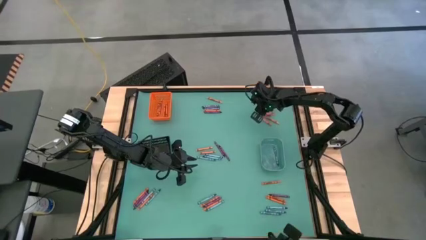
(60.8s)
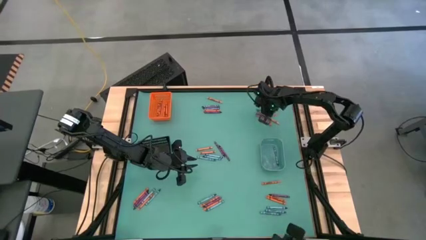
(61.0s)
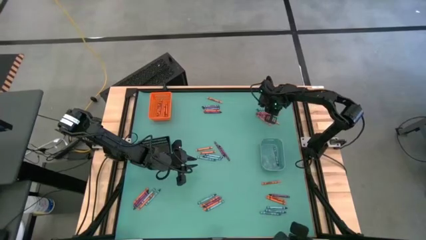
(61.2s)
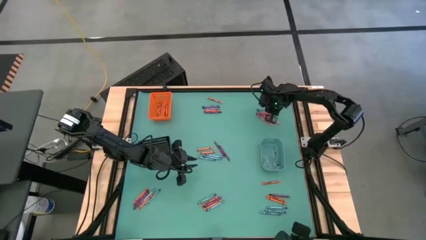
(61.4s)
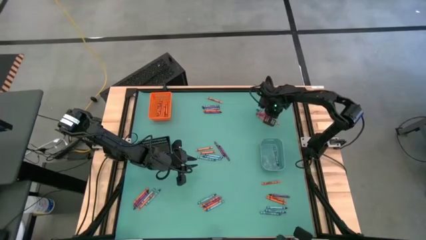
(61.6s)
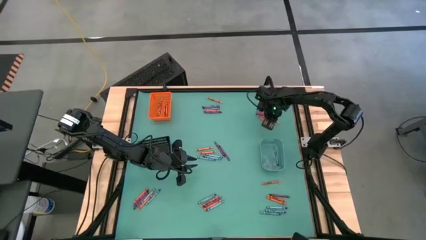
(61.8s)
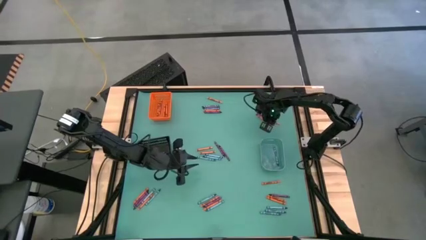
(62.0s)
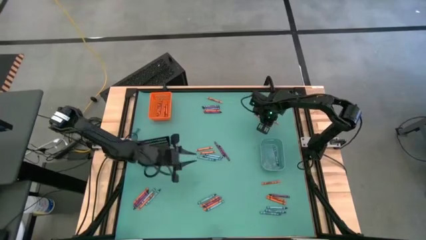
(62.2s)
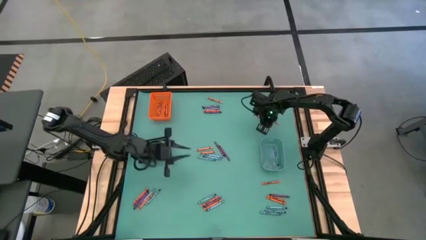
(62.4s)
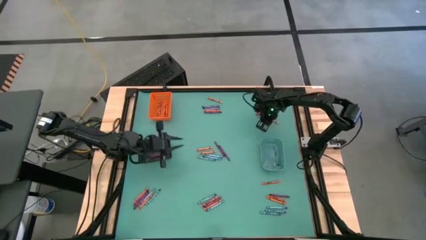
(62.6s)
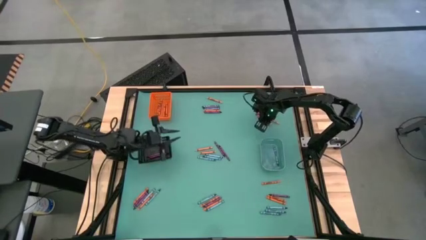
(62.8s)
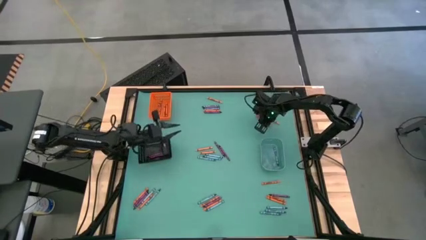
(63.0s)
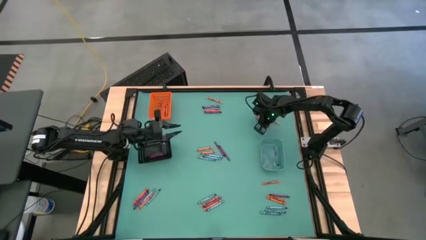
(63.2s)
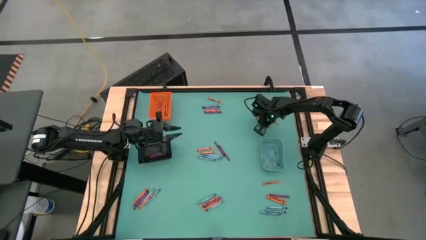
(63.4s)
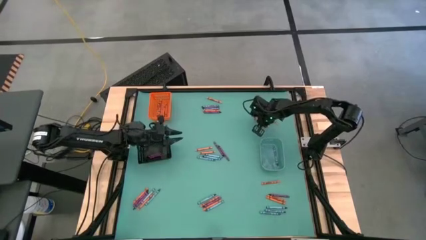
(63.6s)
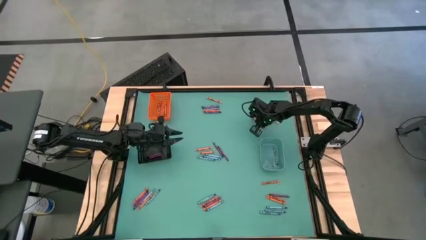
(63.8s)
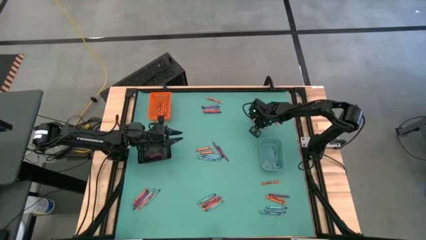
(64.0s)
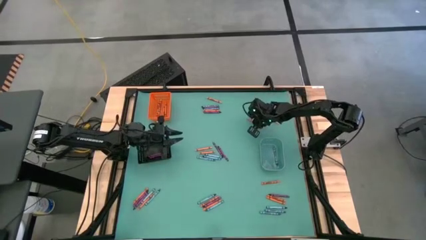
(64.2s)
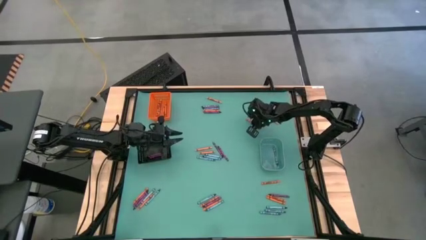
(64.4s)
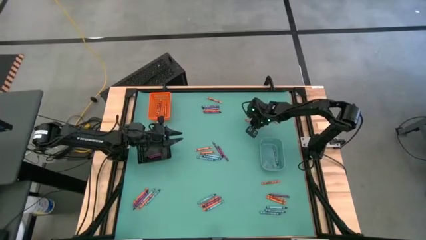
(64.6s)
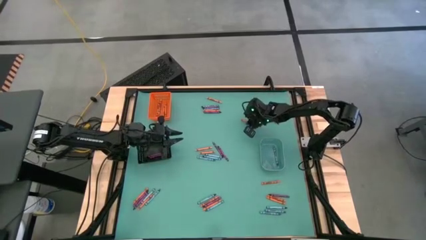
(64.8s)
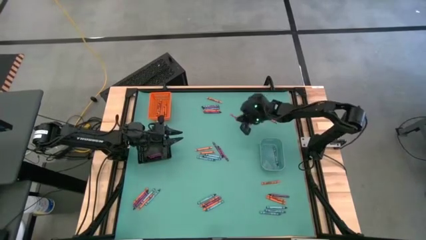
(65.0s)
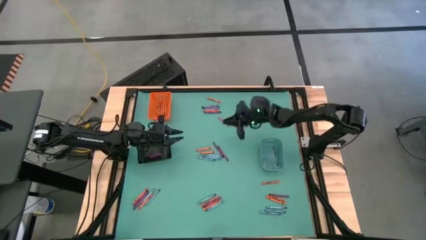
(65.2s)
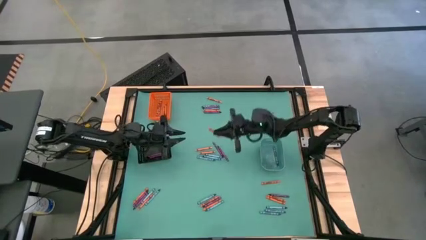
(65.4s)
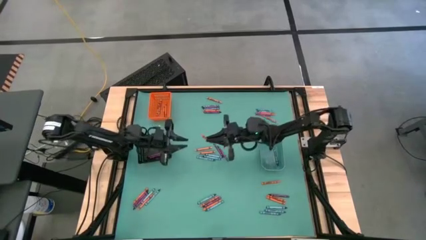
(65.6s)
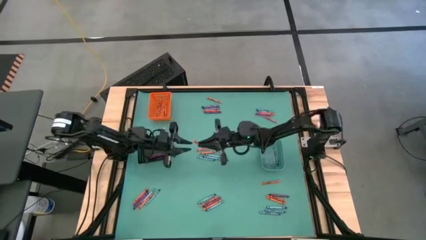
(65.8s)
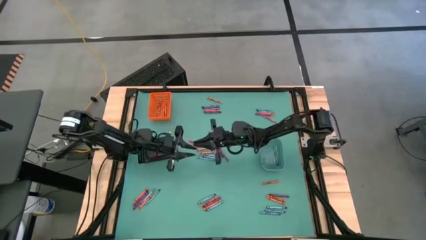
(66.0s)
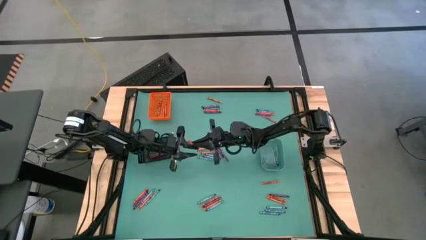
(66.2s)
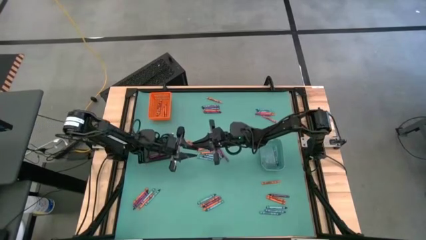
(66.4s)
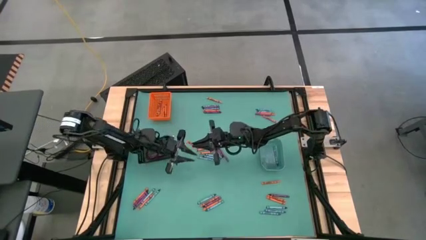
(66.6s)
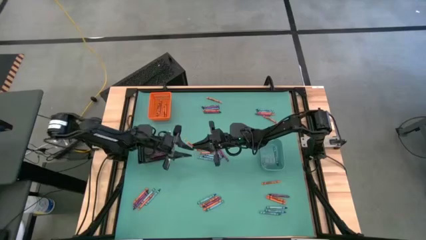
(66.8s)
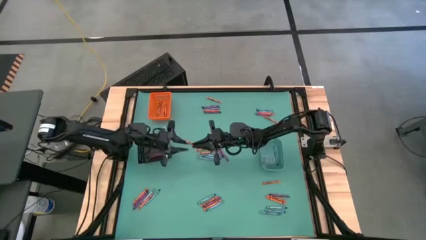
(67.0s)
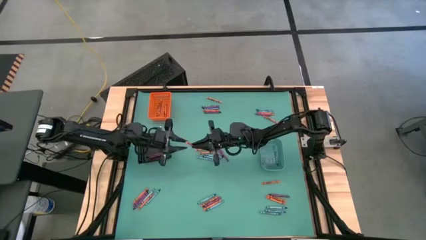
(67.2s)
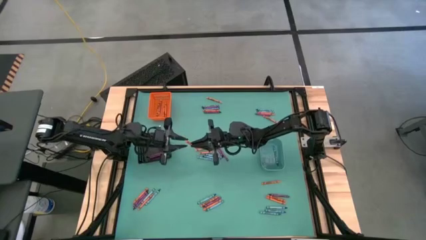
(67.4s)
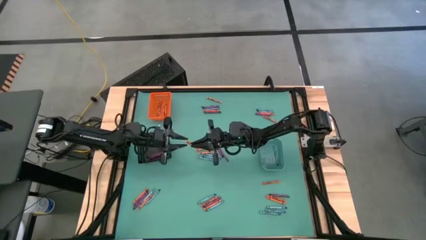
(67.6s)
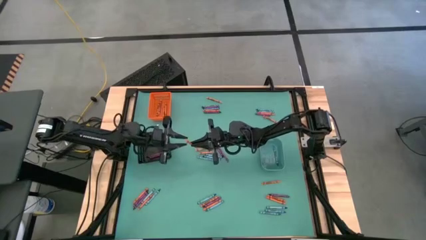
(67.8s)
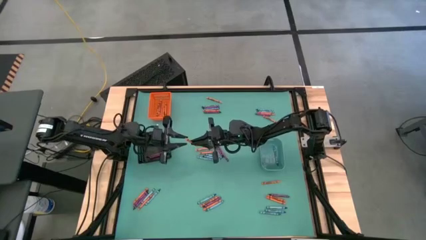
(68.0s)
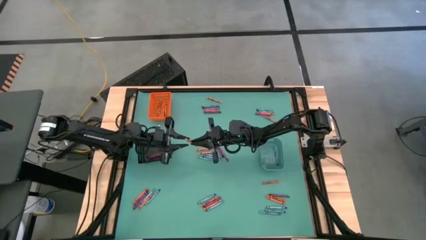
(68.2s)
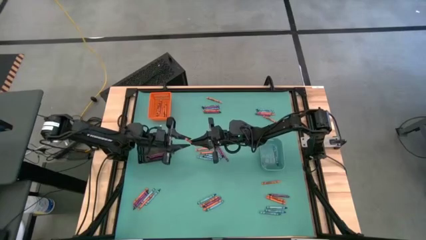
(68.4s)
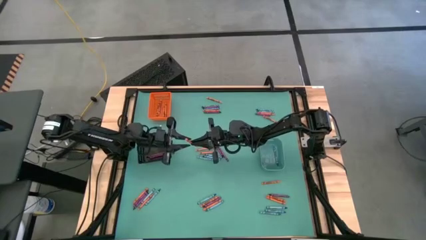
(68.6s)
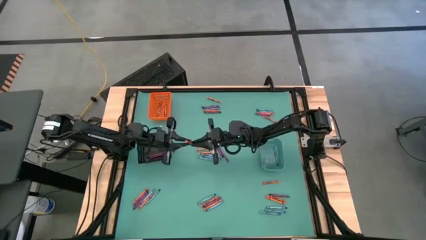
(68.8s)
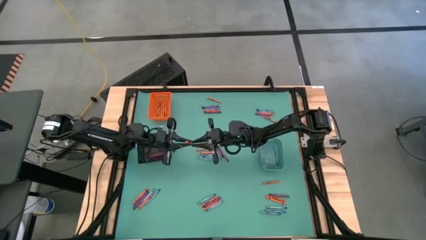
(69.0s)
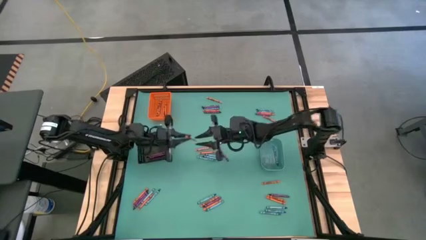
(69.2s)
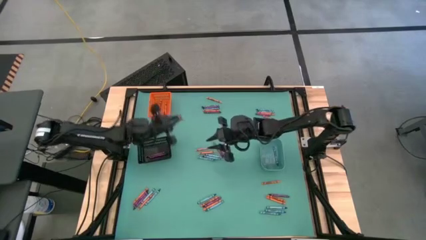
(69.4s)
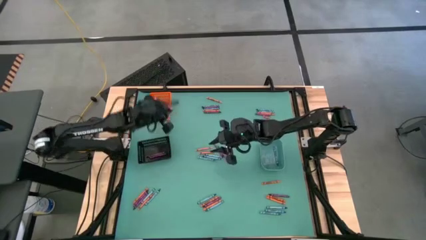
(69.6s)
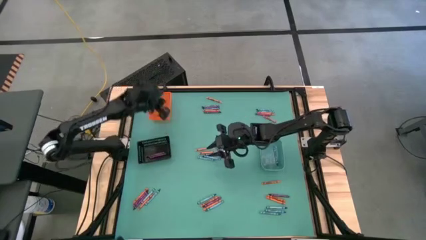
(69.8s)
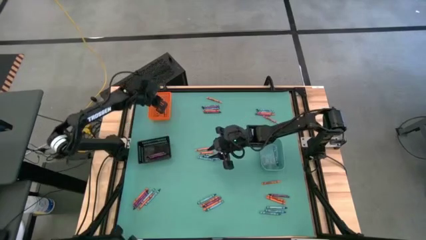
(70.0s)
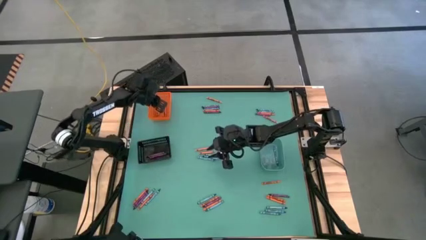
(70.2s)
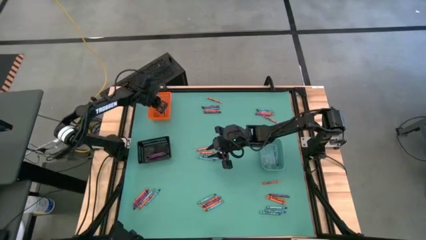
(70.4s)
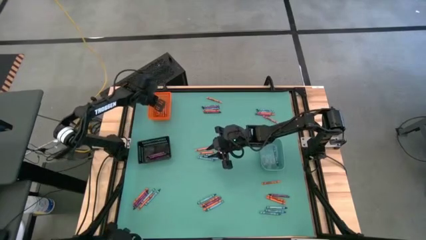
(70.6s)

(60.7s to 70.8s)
Task: Sort crayons
Put the orange crayon into the orange bin

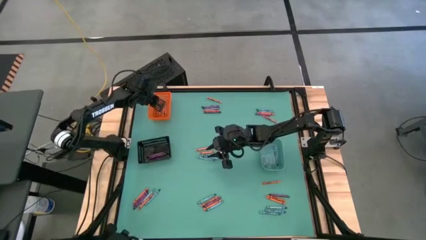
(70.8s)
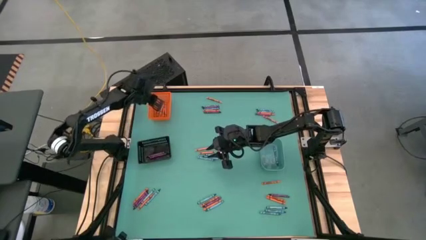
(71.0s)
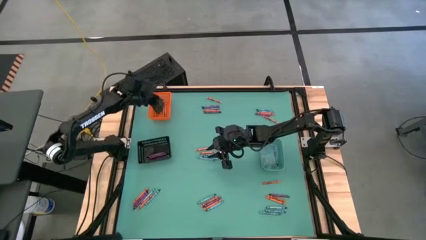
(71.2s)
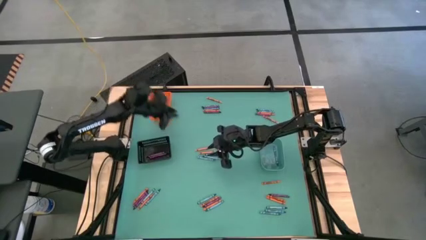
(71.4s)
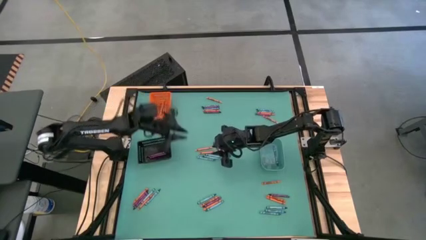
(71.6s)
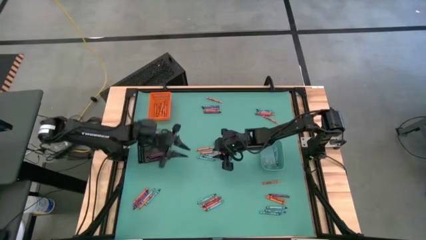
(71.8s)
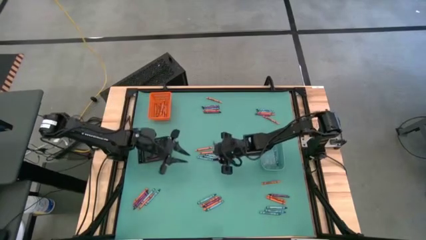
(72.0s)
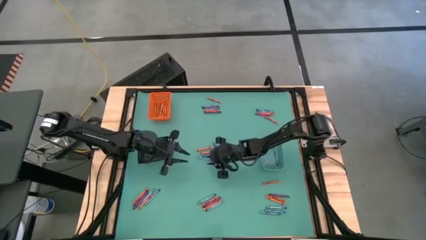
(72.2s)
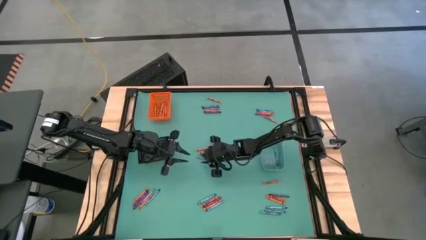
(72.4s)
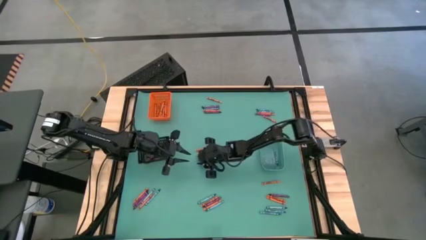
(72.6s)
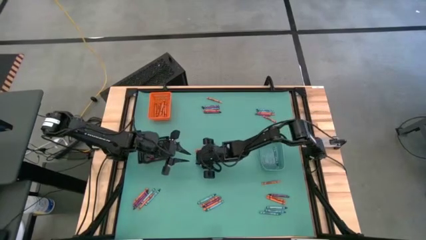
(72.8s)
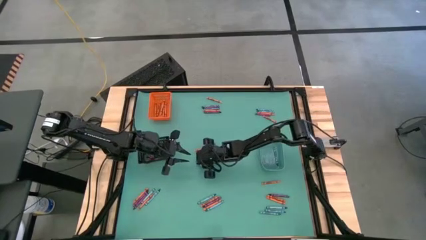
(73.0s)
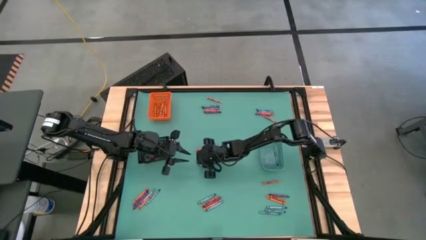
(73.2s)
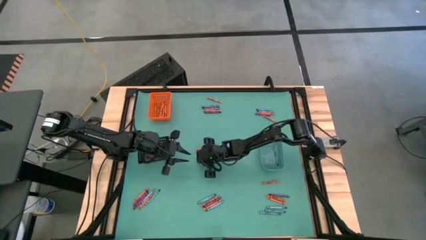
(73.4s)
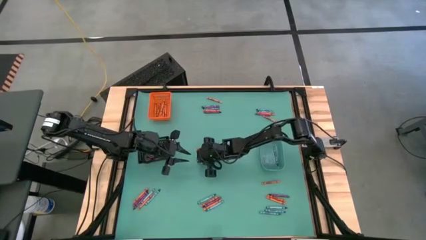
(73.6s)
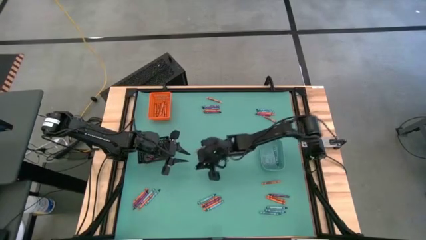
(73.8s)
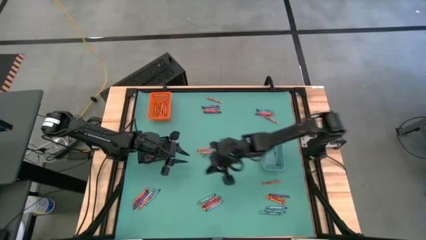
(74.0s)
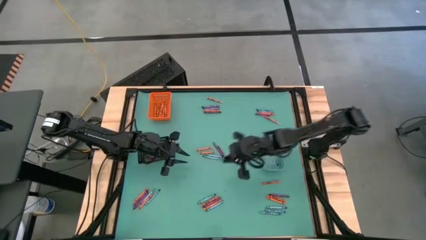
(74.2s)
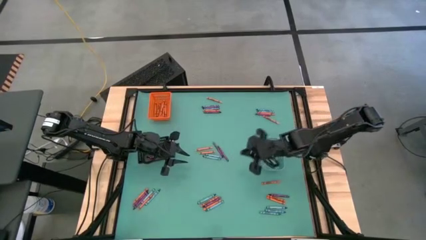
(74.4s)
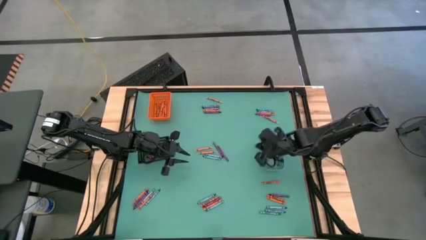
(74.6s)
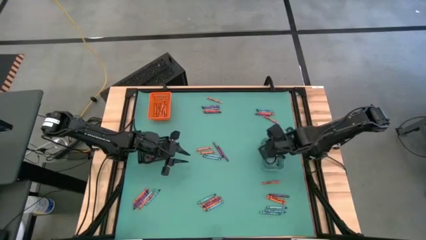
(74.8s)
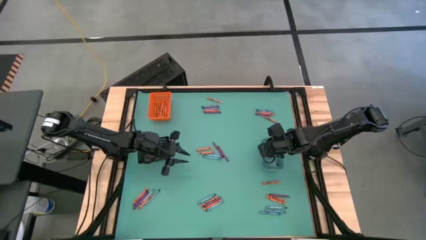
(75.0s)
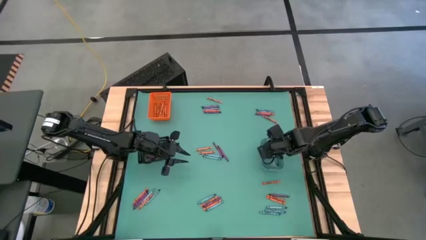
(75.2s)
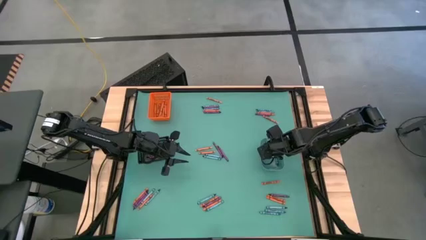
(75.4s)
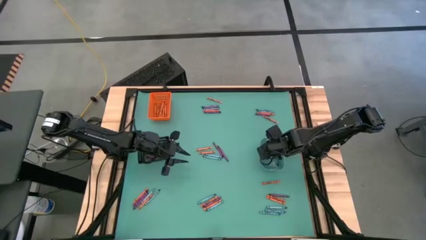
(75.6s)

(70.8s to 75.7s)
Put the light blue crayon into the blue bin

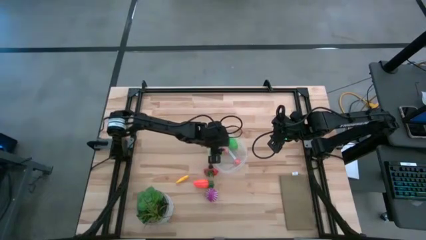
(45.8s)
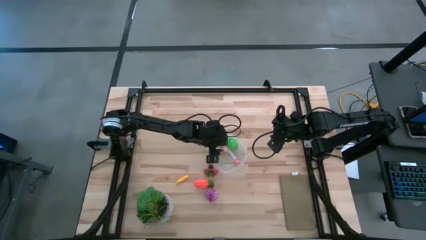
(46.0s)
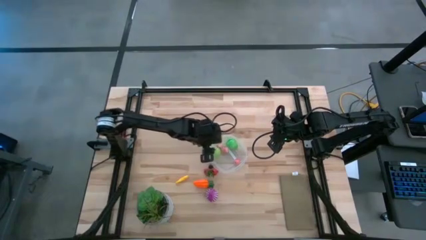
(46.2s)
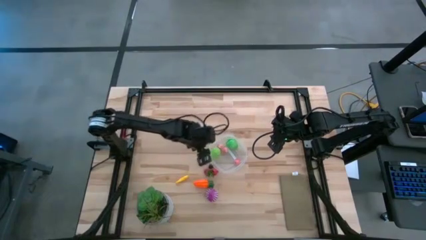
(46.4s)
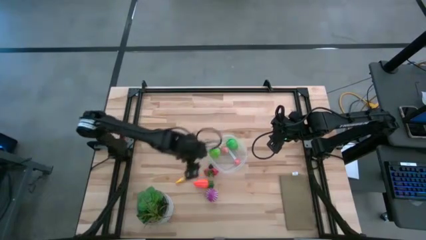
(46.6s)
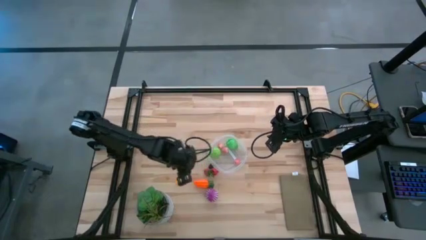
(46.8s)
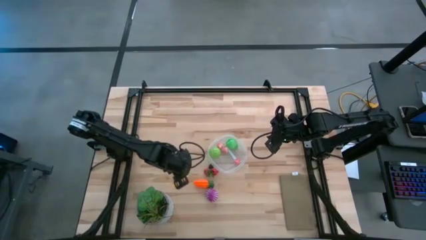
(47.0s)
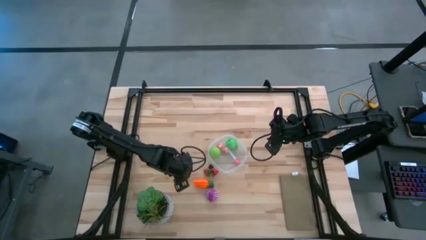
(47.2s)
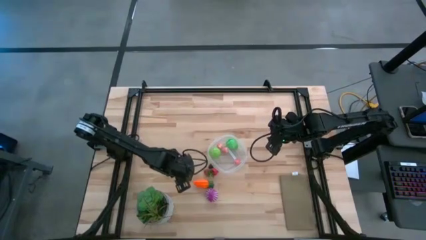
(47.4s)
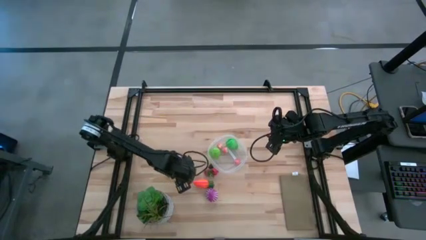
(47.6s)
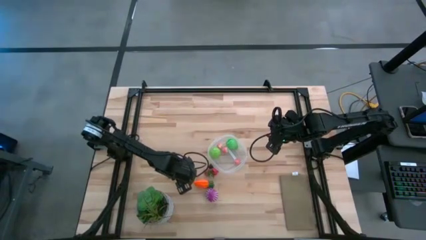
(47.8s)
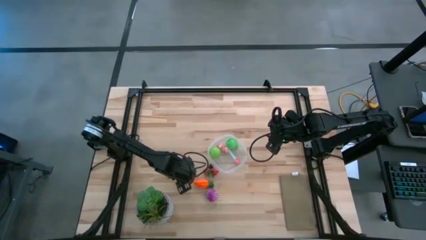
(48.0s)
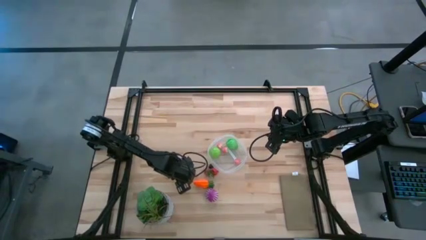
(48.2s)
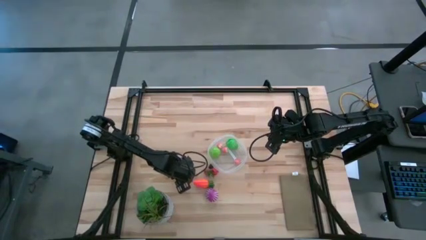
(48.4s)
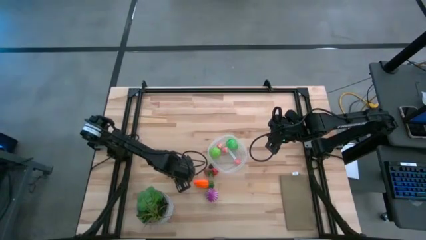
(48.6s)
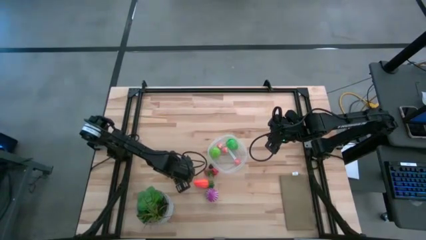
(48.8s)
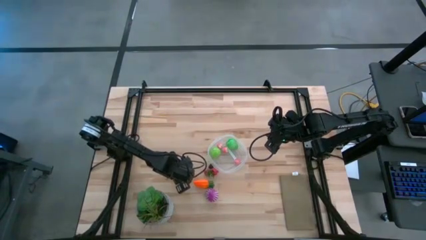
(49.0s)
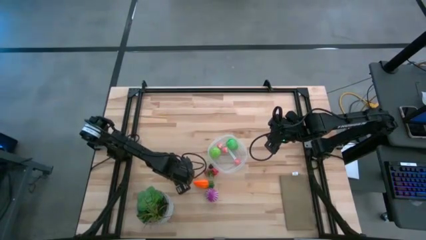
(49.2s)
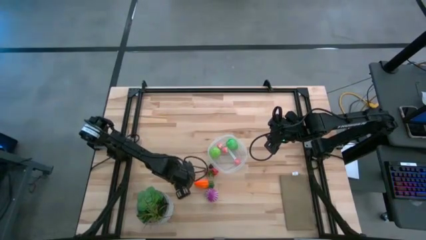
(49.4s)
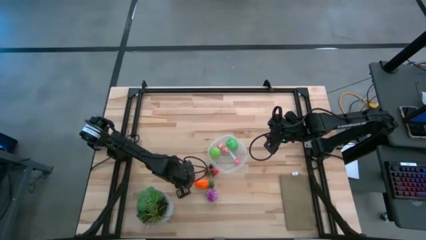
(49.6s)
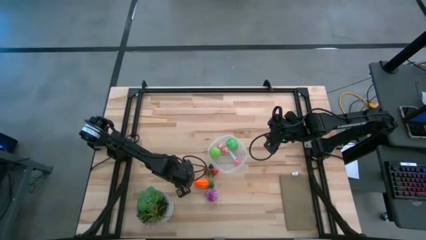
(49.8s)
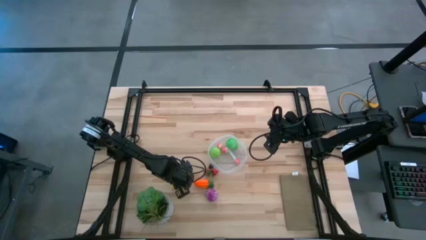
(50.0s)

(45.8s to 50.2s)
Task: Pick and placing Produce into tupperware
Put the yellow corn into the transparent bin
